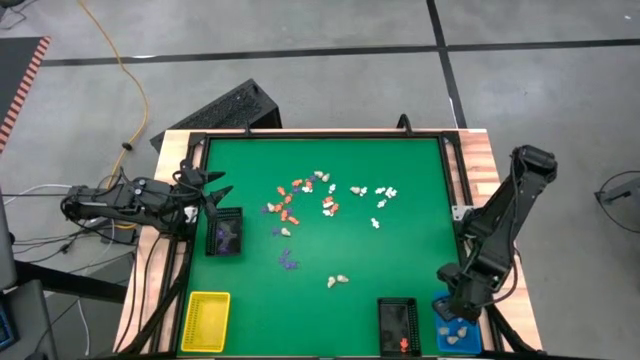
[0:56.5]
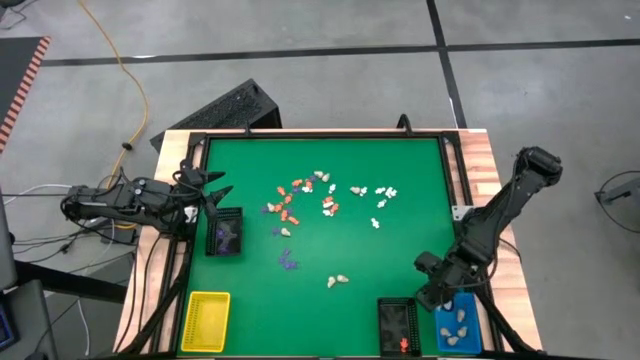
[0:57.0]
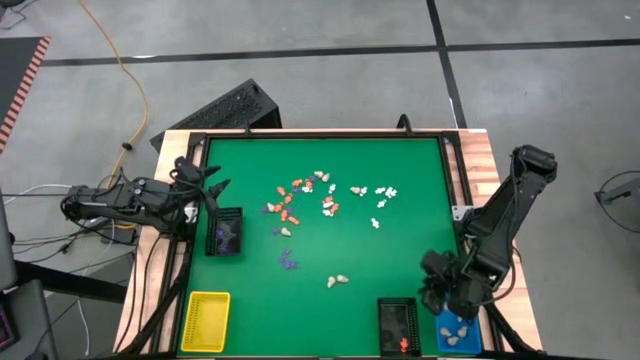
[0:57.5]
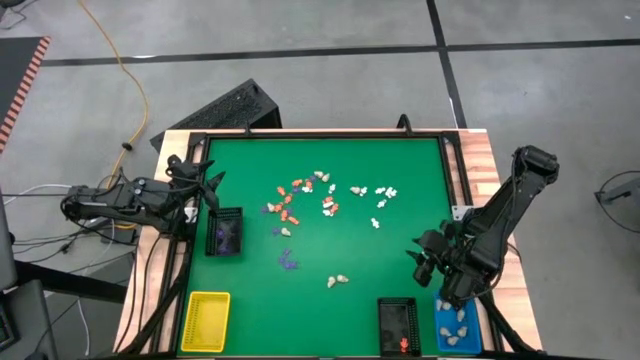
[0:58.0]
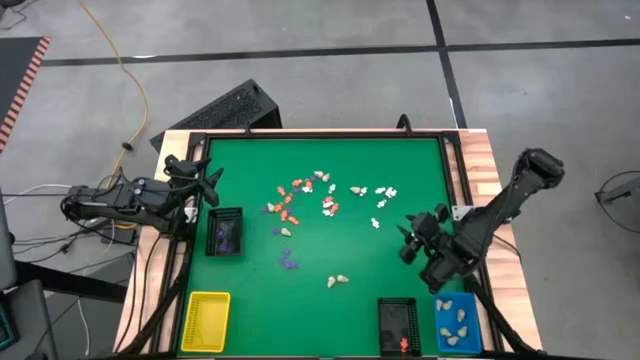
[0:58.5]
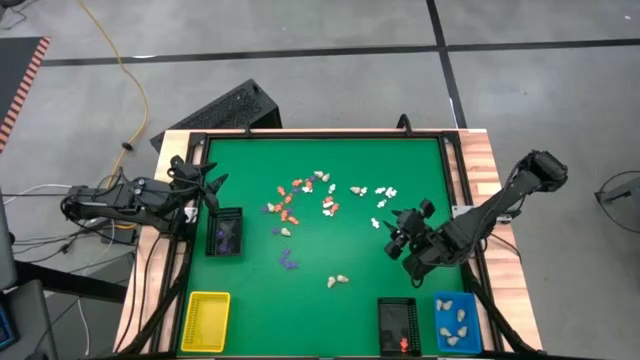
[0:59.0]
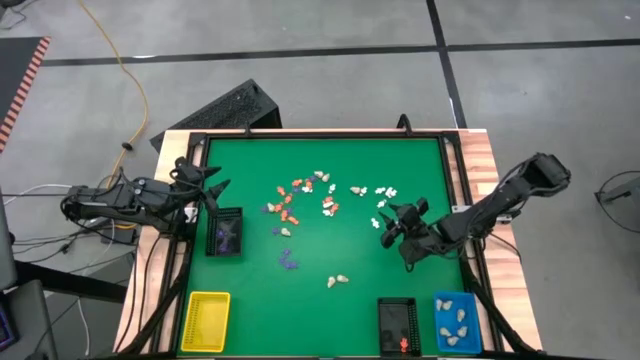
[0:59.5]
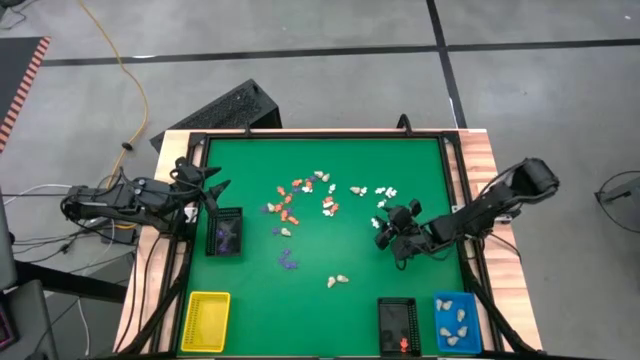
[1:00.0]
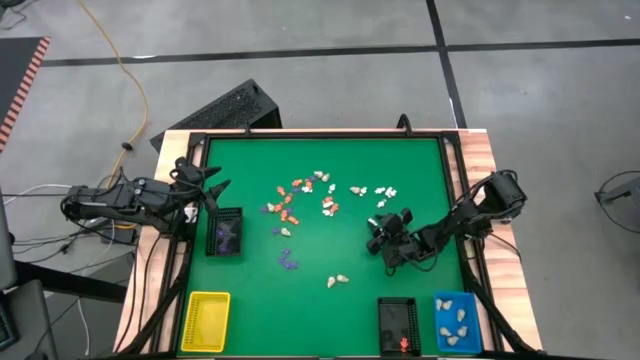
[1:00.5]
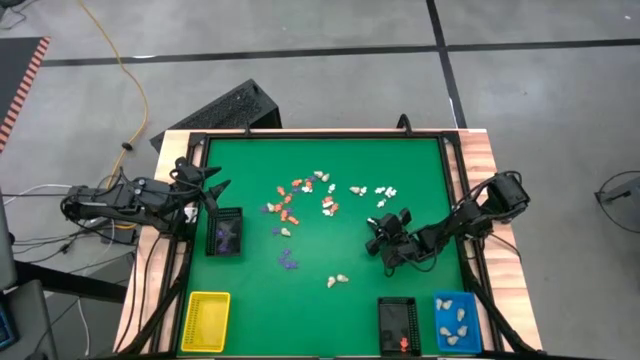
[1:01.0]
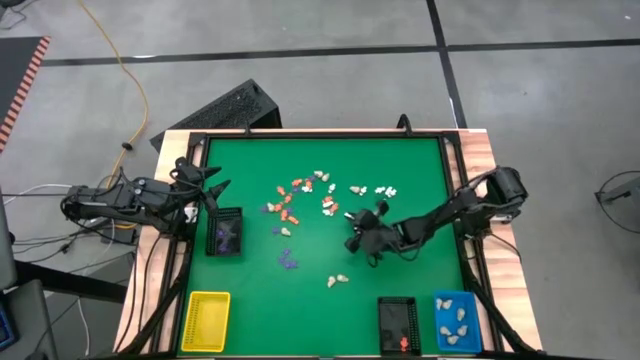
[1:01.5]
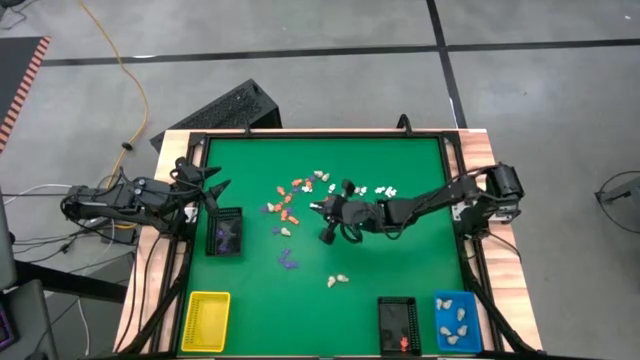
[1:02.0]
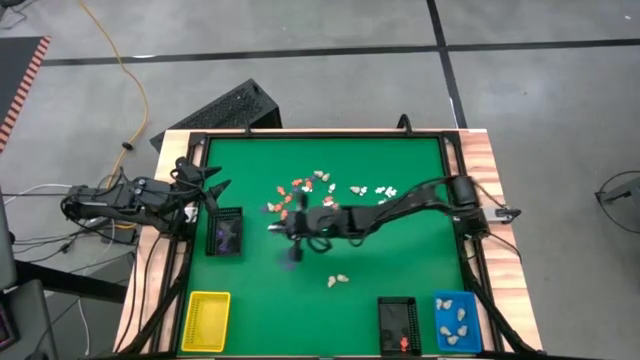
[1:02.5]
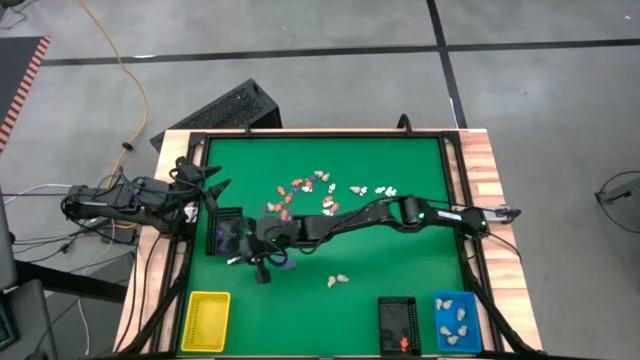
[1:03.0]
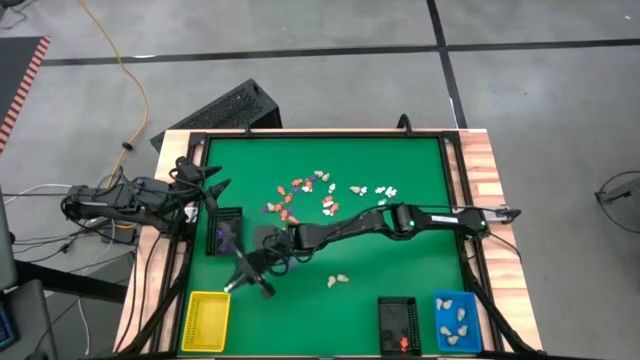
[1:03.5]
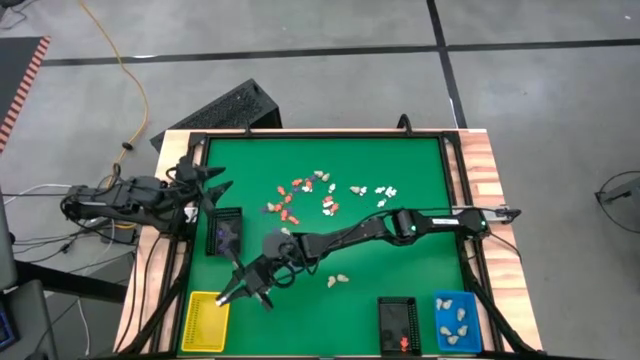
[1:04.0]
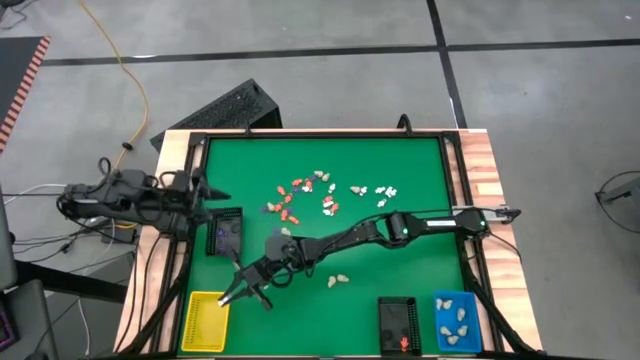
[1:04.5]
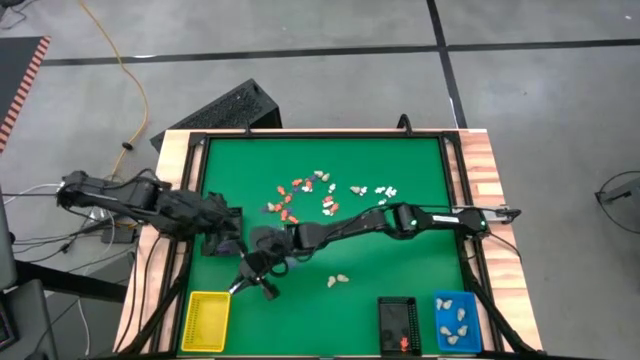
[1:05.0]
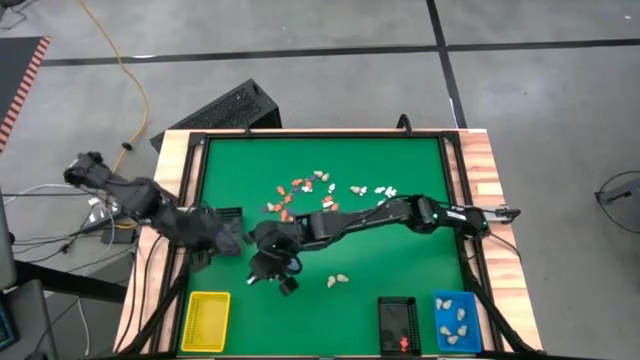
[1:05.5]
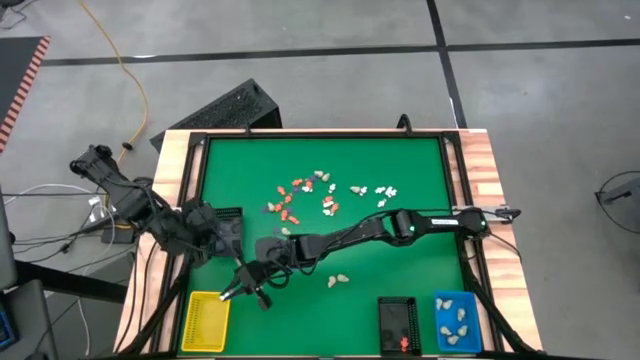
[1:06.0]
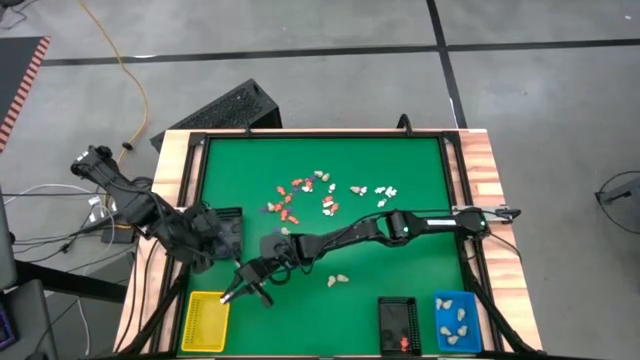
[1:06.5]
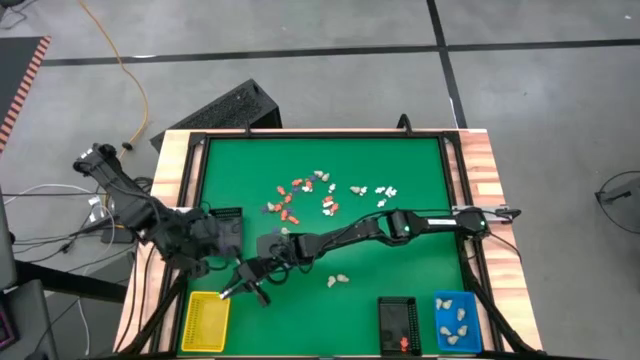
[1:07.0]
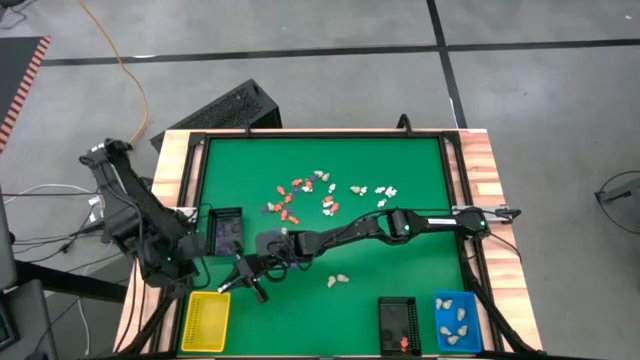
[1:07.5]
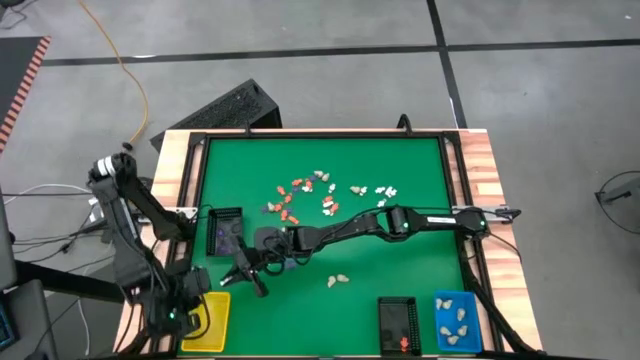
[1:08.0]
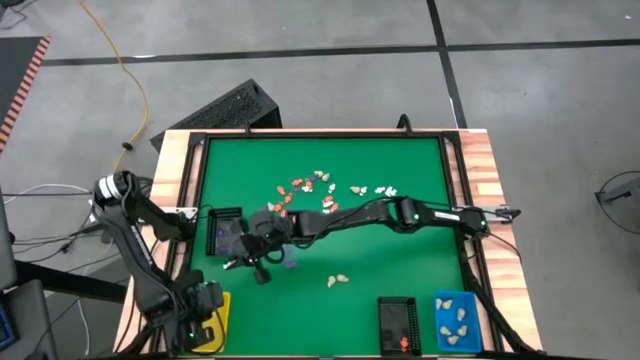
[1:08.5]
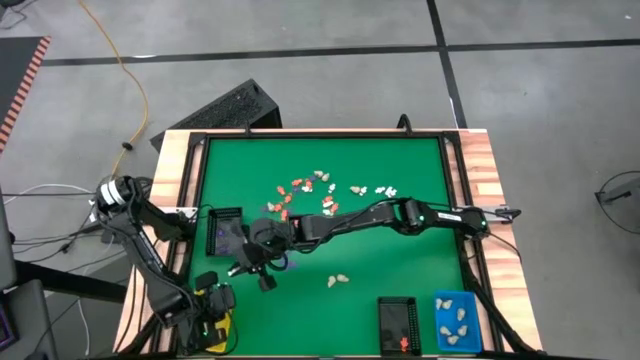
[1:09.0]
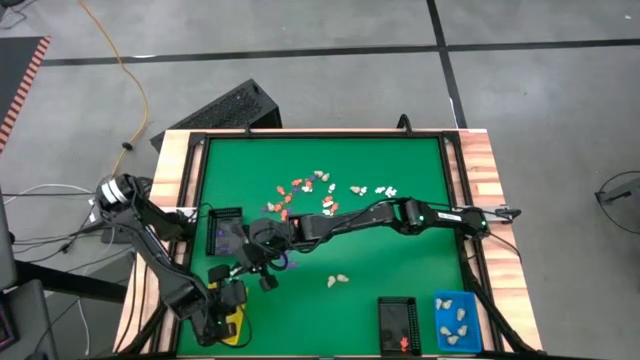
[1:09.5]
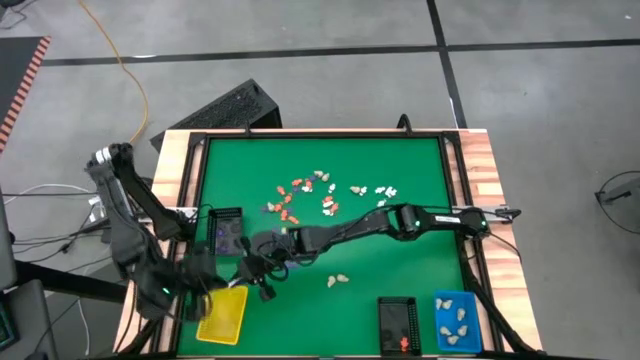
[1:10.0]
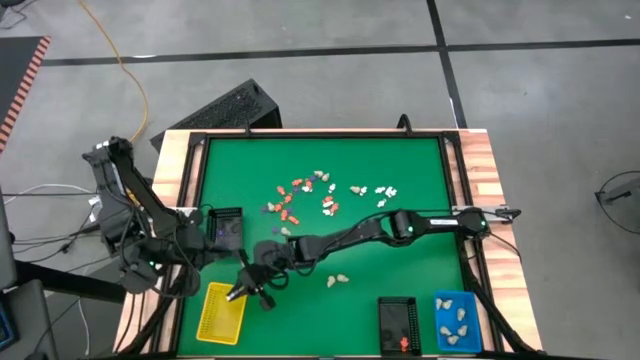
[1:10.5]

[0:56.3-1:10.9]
Task: Sort Halloween decoration
Put the white skeleton toy into the yellow basket

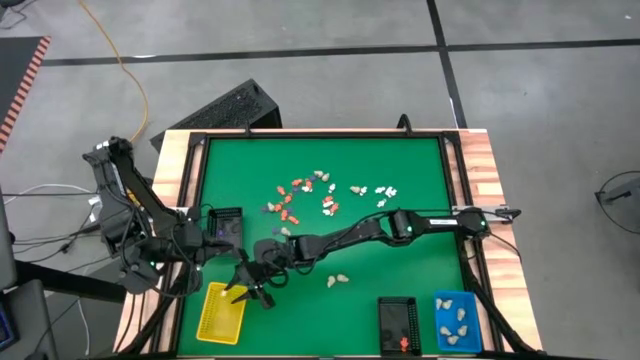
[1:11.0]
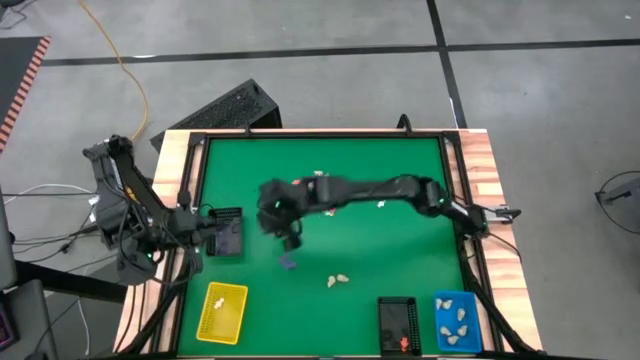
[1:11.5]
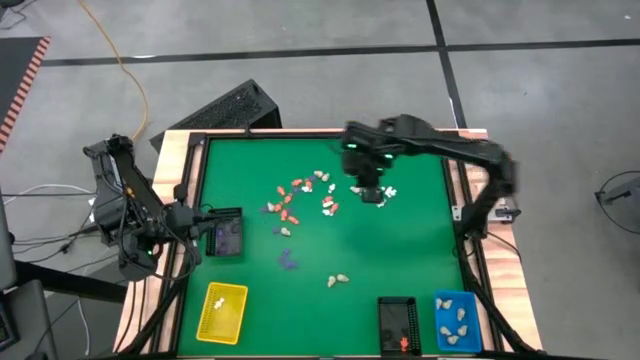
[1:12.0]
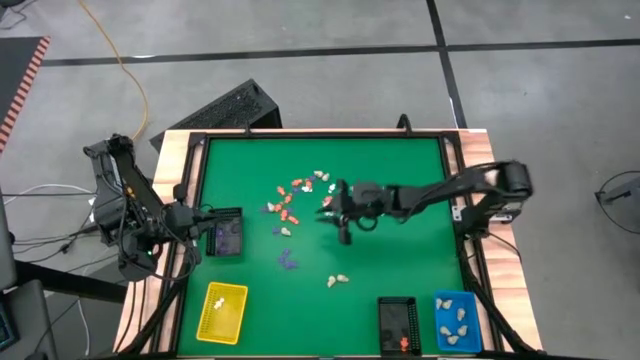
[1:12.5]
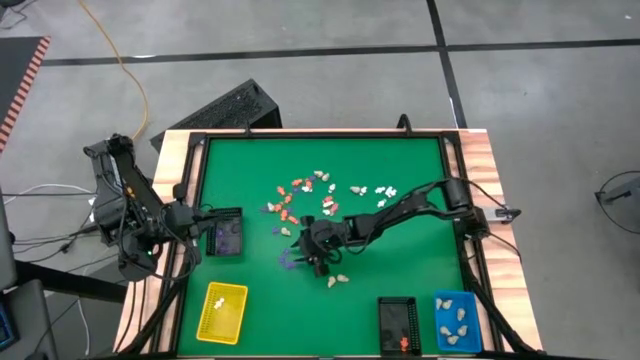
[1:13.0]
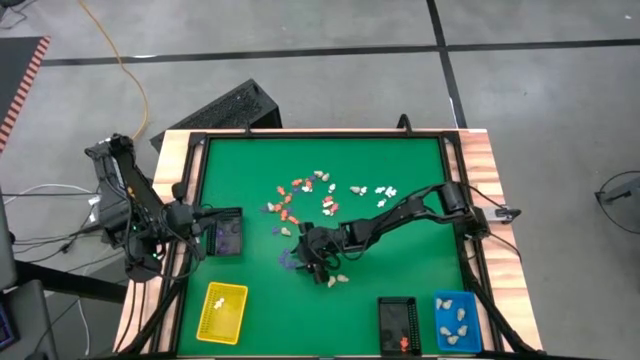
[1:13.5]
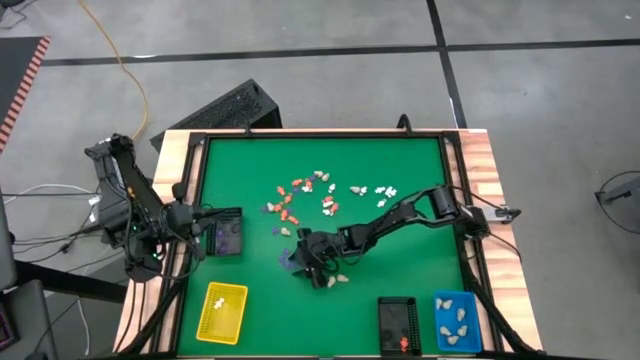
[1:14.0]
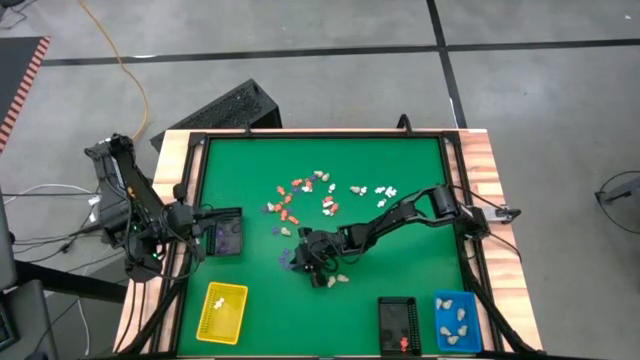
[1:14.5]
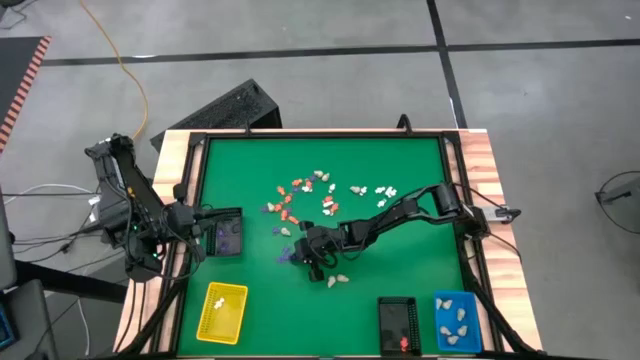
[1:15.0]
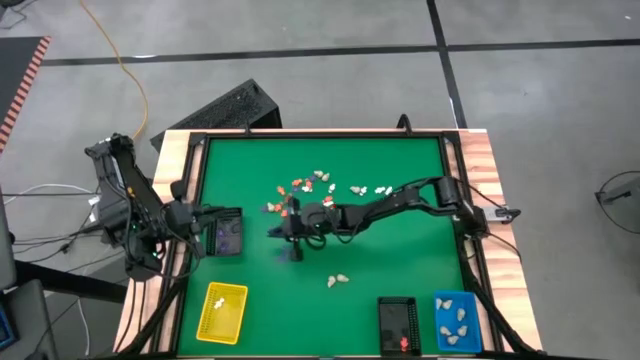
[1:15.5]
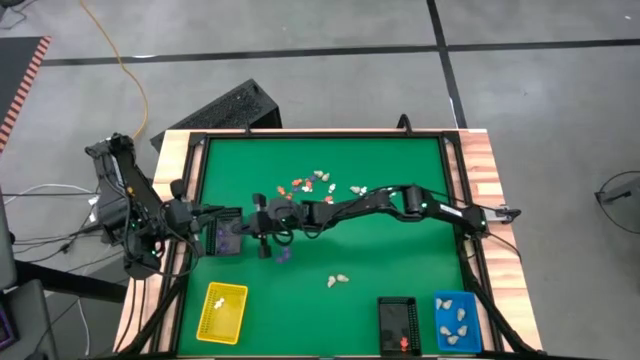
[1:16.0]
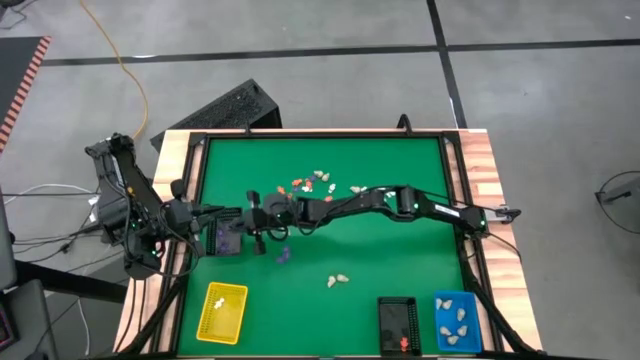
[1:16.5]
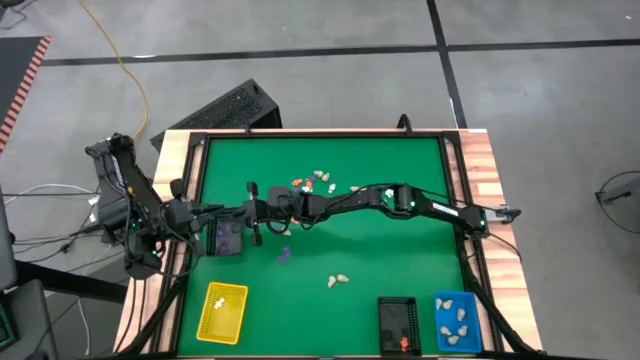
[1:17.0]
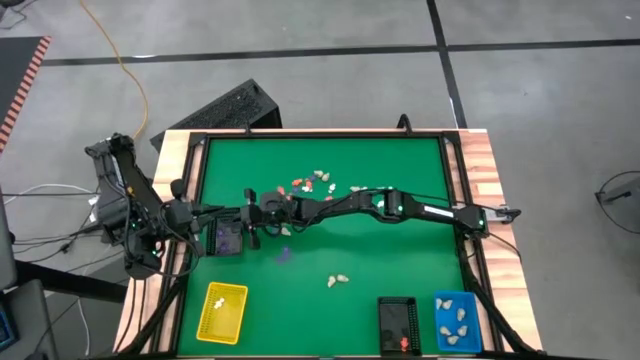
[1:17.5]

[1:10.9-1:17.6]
Put the purple spider toy into the top black basket

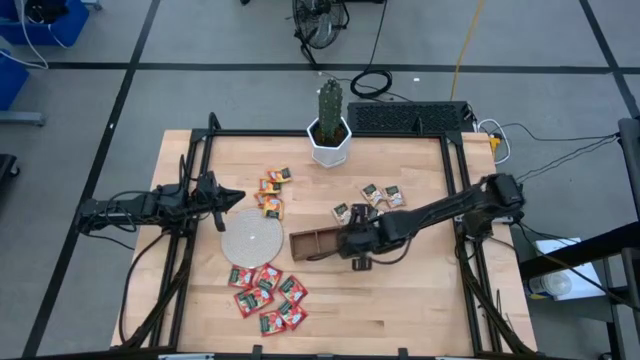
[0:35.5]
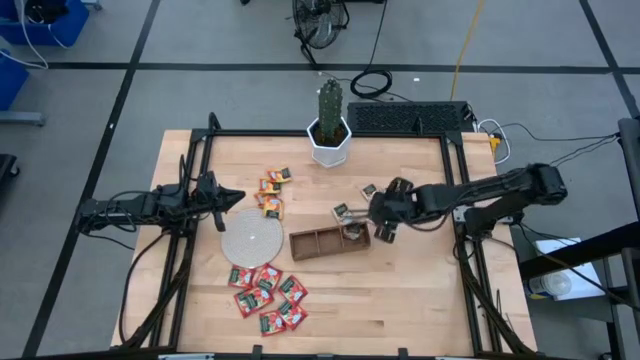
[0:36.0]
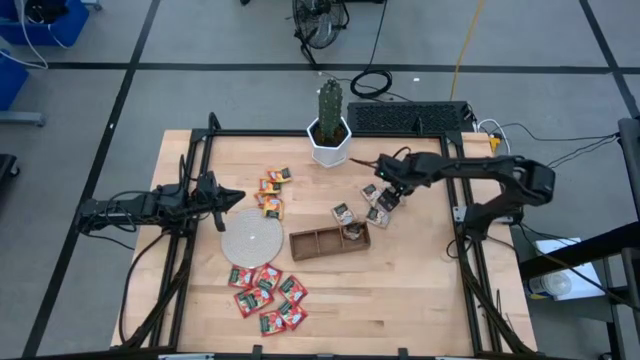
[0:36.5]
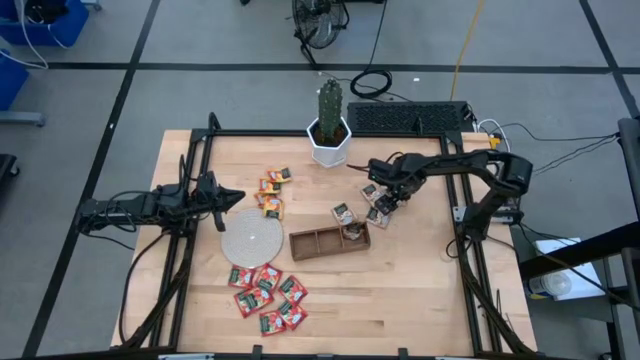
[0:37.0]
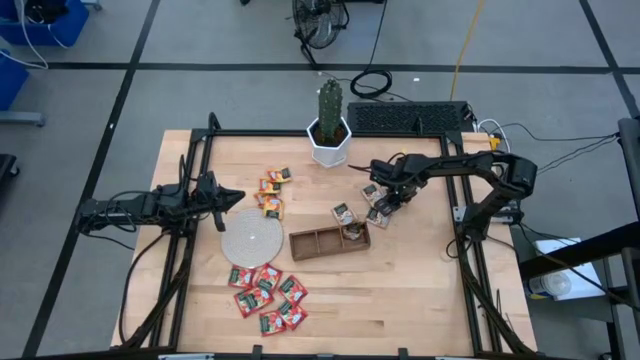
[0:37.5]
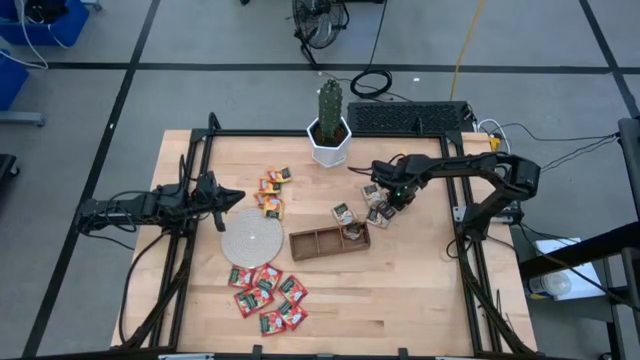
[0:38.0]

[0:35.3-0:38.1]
Task: Pick & Place Tea
Put the brown tea bag into the right section of the wooden organizer
